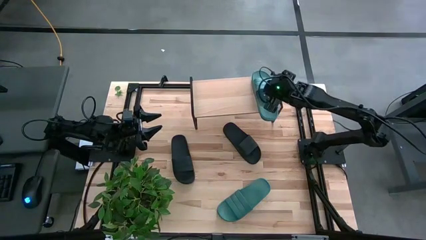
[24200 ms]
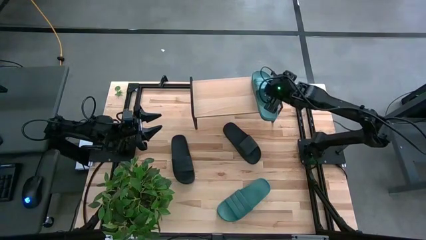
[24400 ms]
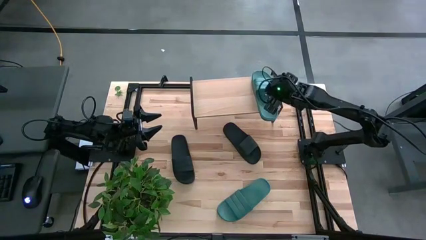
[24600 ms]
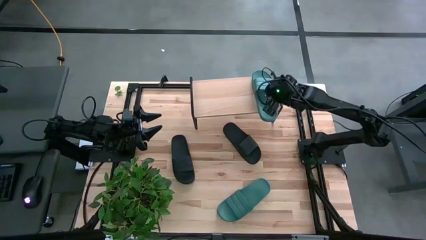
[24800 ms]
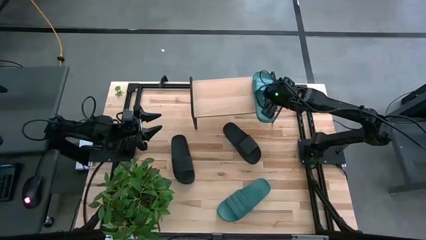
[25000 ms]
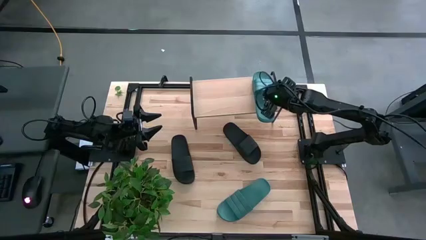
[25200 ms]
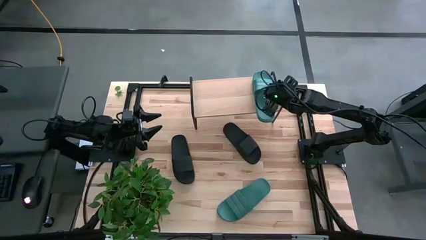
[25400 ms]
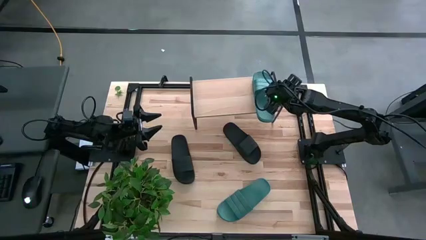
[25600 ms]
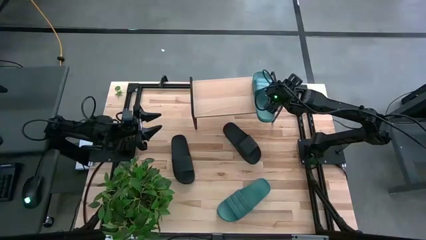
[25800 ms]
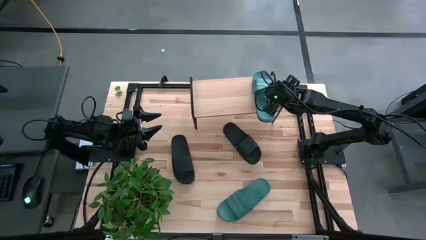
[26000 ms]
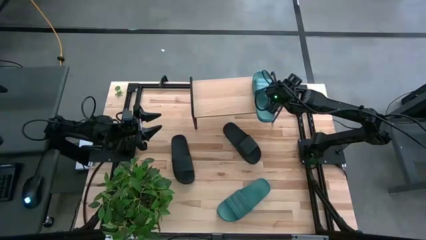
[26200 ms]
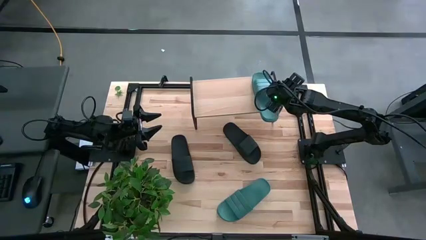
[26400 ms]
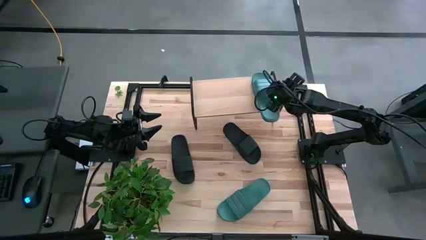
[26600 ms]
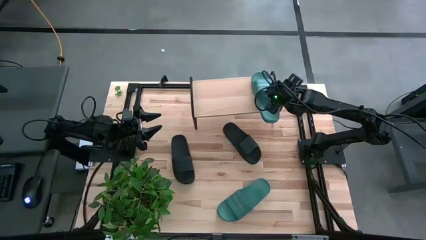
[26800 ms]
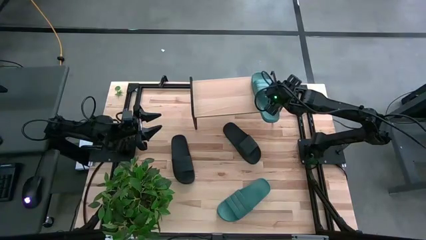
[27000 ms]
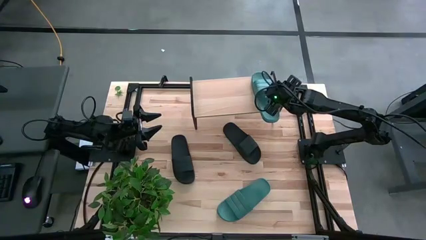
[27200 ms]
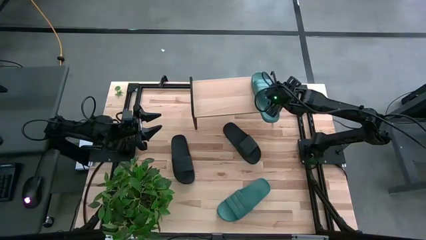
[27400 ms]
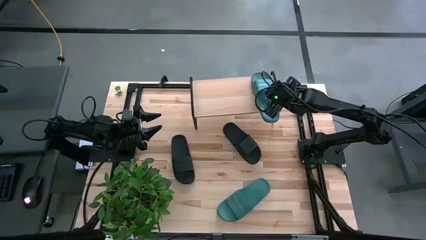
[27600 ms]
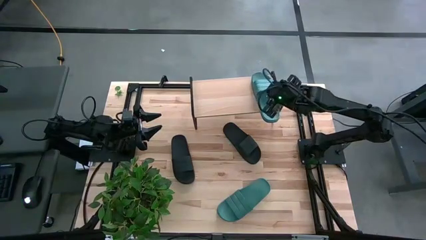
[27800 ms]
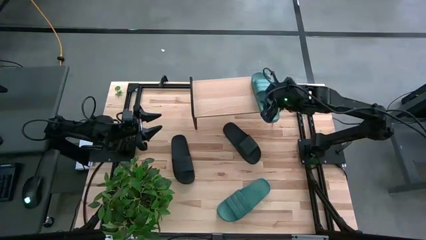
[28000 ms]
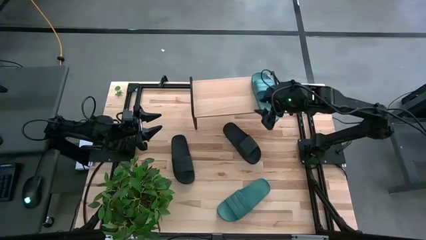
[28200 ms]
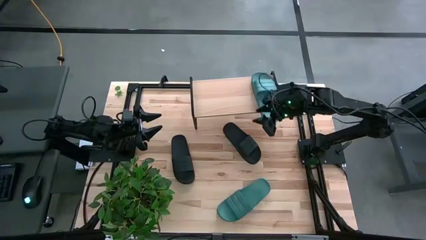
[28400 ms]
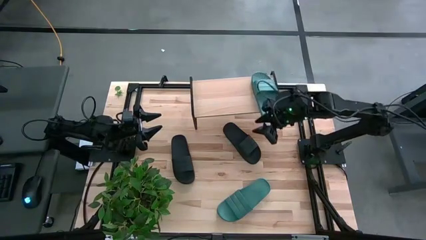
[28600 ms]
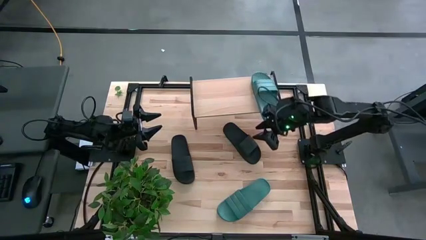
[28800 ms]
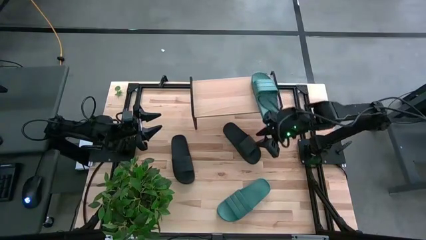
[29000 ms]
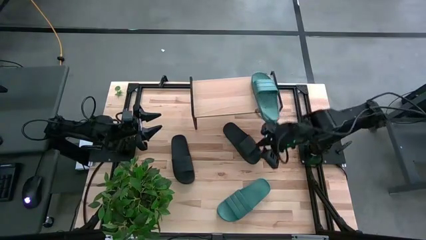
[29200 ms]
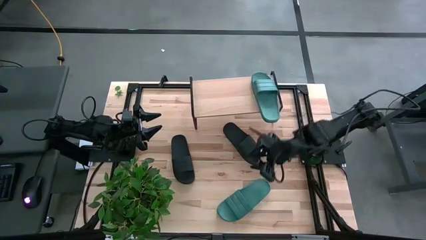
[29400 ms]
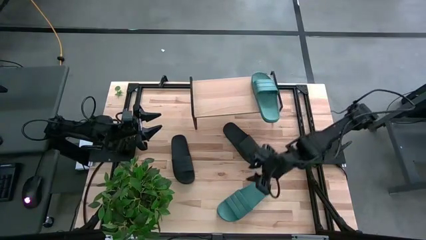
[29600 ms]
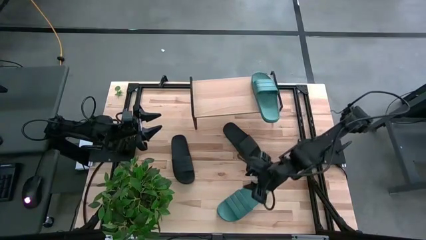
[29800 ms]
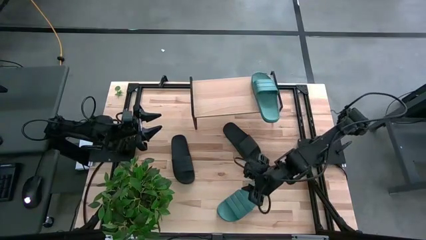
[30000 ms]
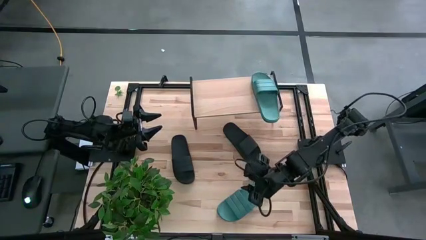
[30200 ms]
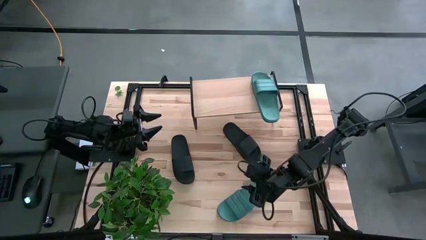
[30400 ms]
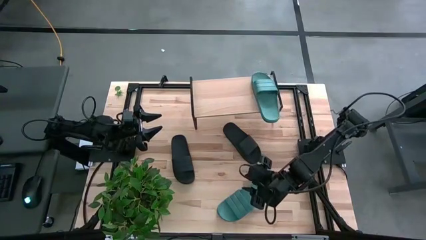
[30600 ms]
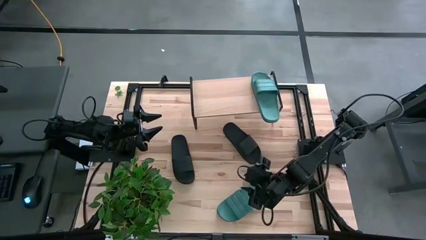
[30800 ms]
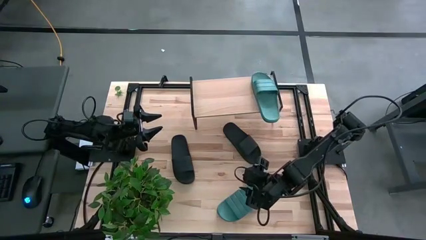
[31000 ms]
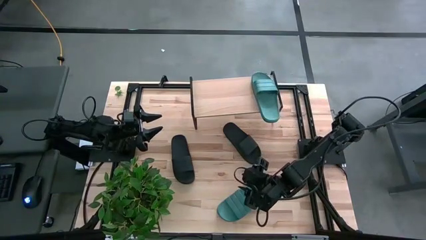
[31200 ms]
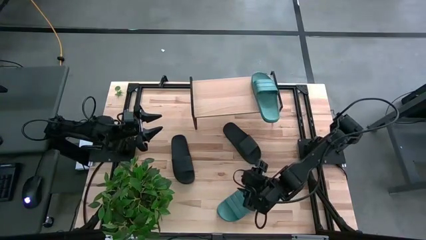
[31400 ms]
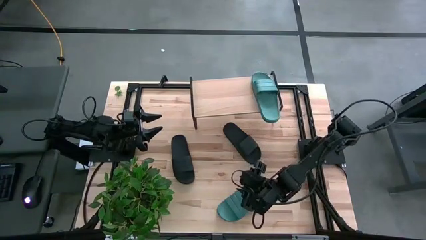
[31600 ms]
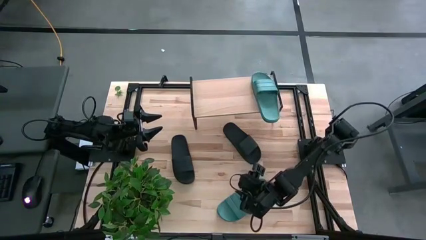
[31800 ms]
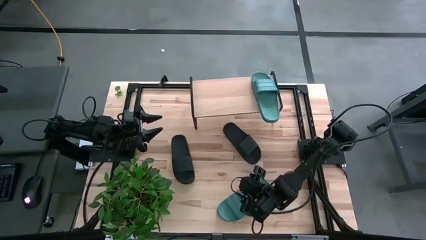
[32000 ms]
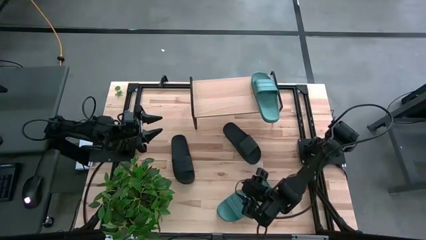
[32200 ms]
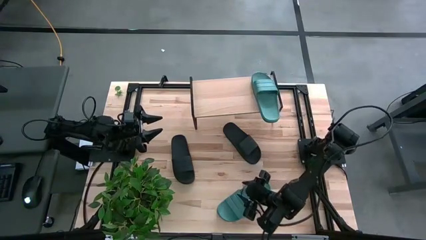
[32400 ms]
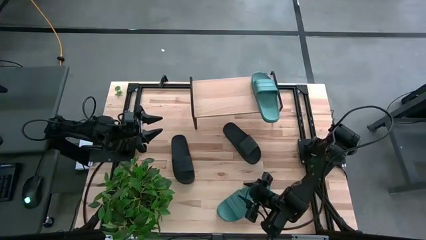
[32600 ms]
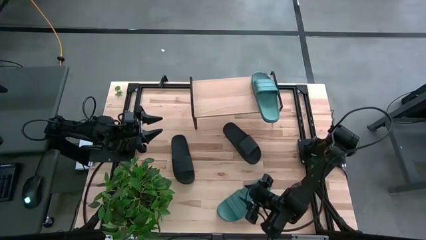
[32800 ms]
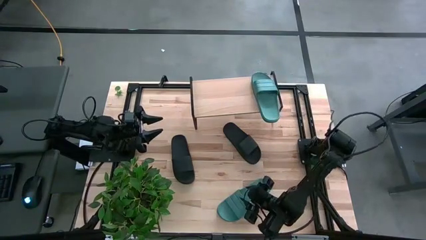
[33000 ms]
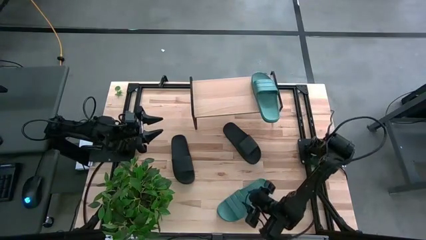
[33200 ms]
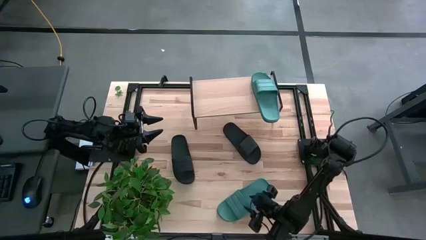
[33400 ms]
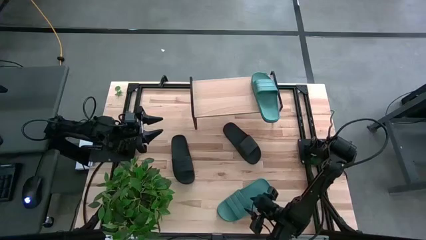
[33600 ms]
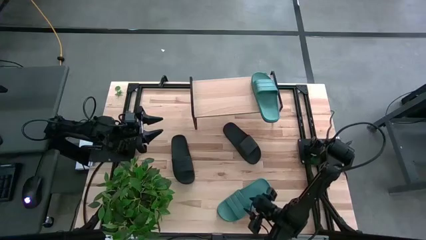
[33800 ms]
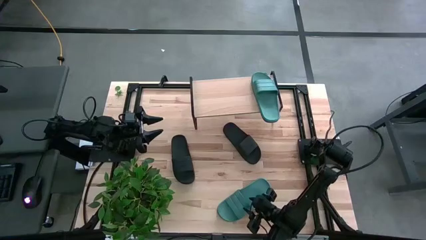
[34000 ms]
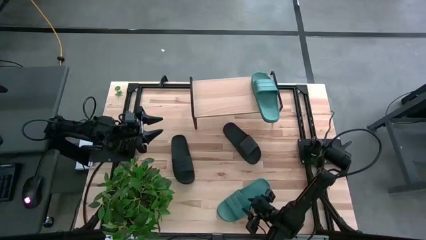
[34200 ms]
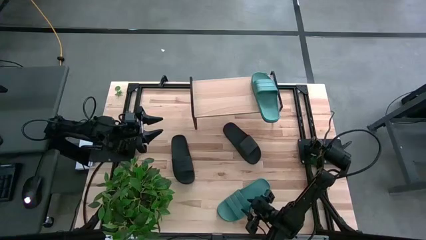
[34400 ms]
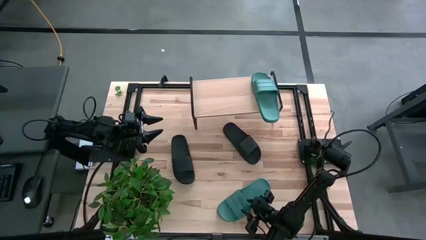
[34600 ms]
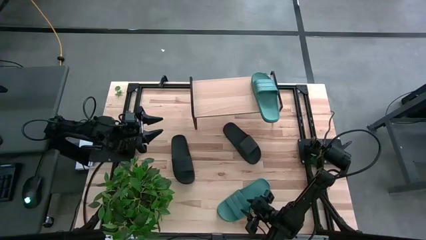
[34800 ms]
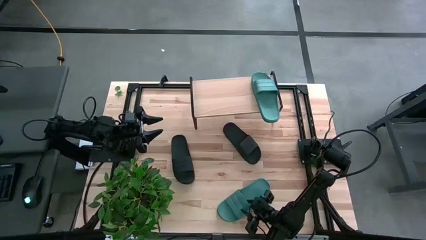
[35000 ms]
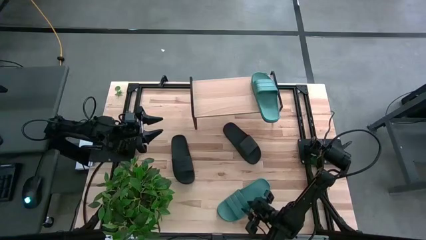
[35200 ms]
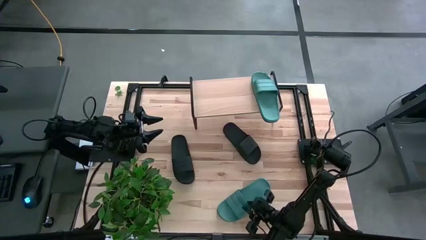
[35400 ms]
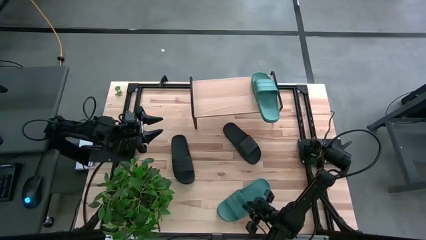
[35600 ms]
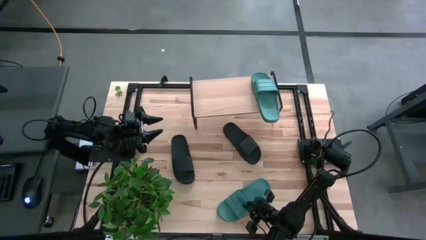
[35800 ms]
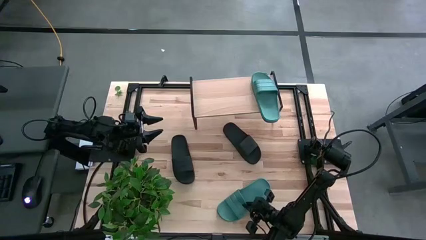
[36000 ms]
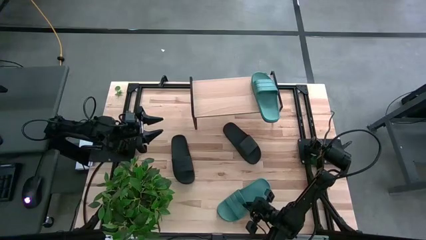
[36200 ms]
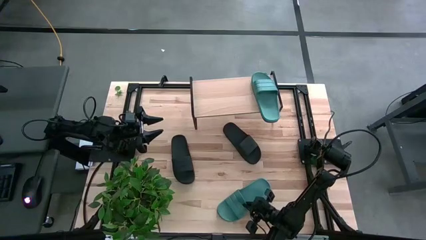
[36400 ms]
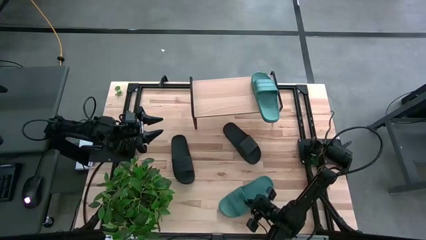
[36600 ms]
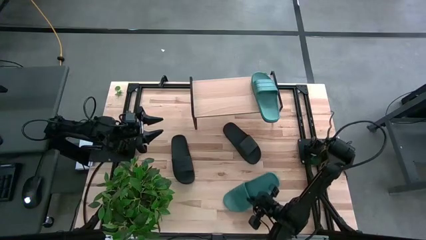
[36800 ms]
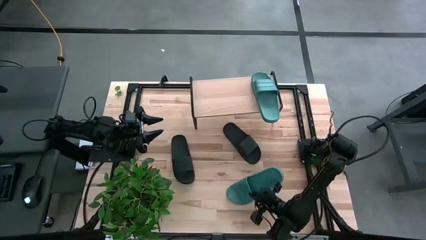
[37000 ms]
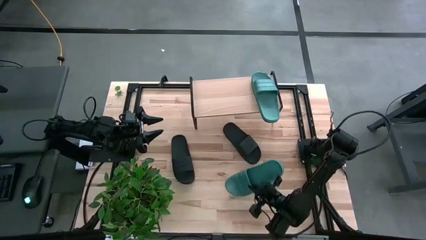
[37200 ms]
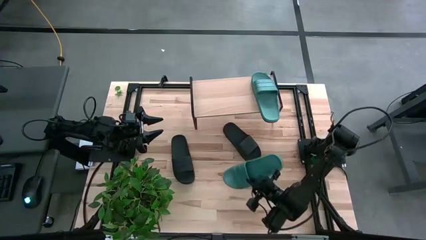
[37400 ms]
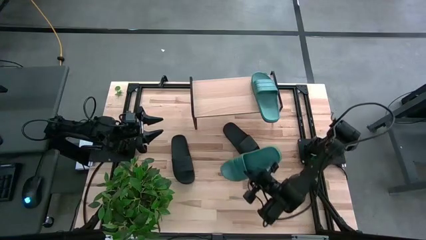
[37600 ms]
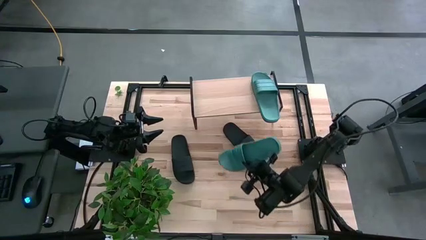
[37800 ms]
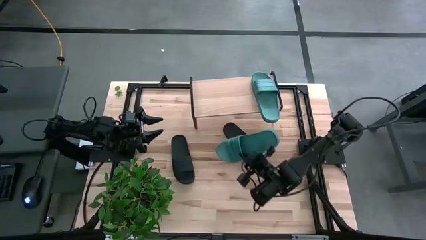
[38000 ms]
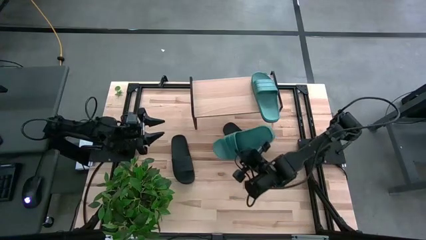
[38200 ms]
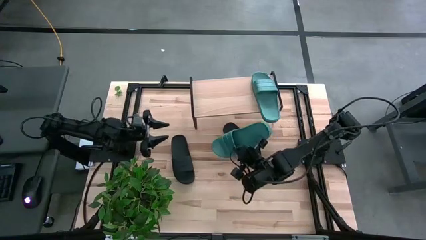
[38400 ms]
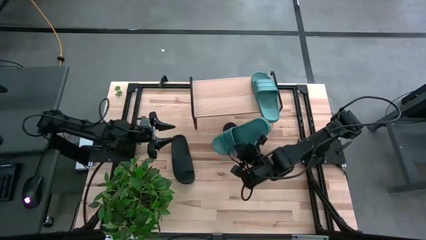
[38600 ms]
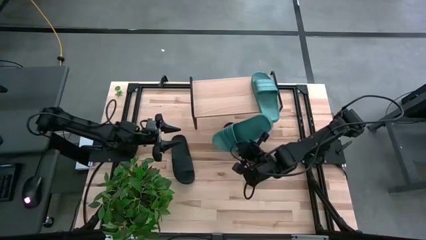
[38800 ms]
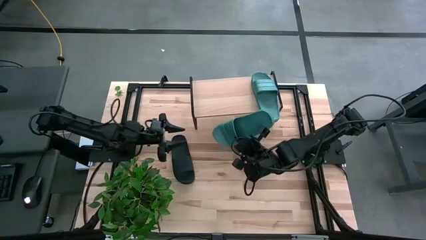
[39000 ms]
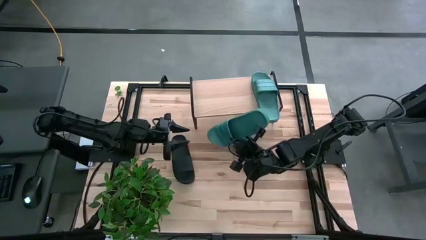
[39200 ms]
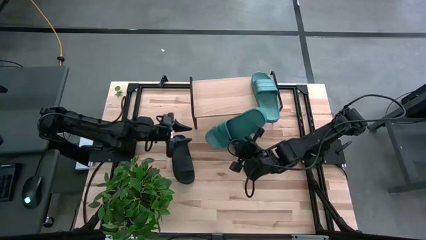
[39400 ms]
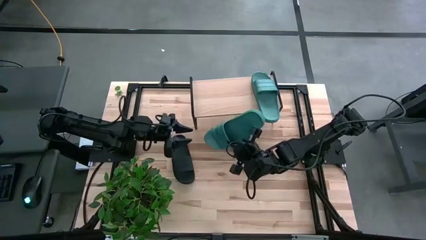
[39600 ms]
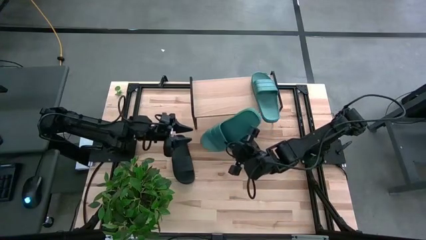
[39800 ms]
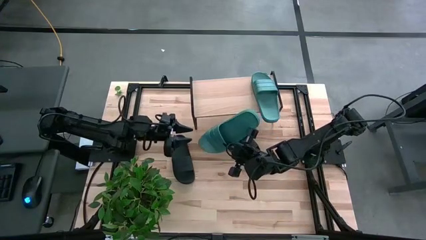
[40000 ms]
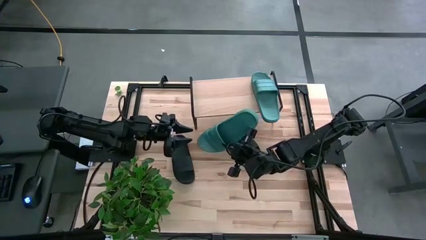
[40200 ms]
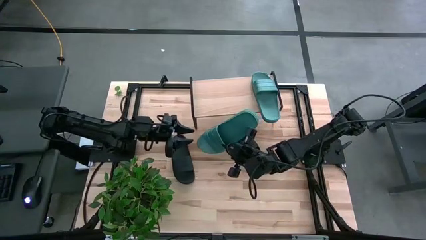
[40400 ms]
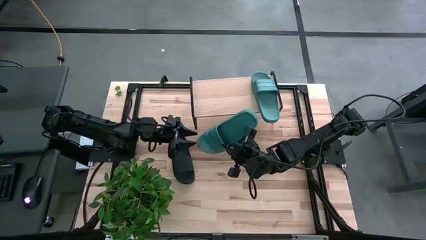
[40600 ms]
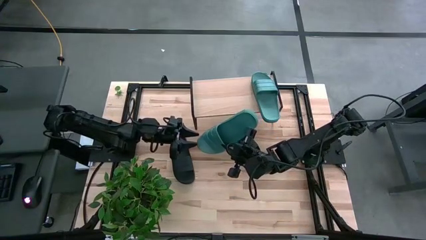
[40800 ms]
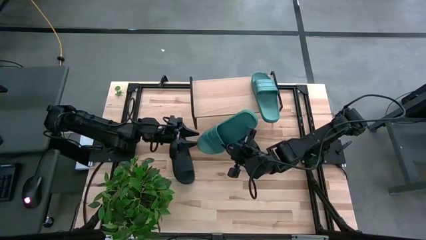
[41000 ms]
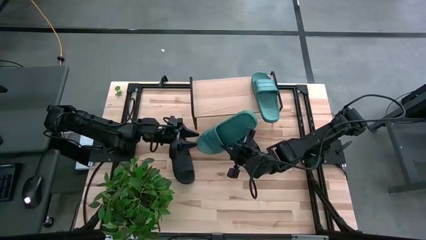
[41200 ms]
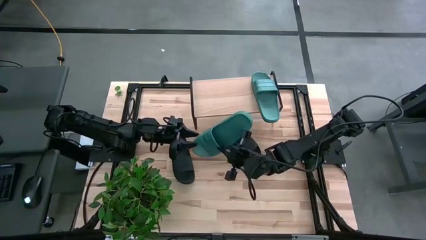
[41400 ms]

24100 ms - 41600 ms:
Task: Pick and place slides into the shelf
Put the green slipper on the shelf
